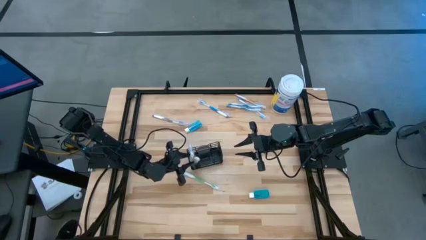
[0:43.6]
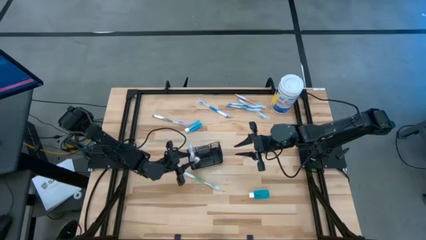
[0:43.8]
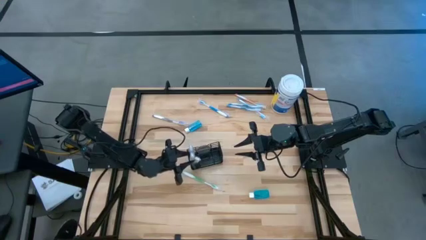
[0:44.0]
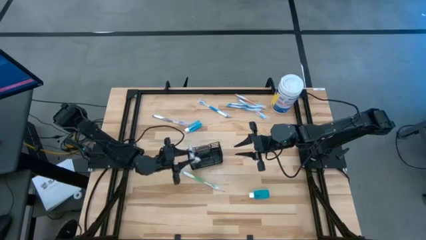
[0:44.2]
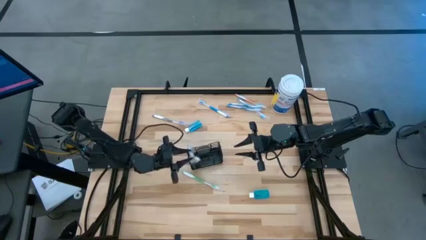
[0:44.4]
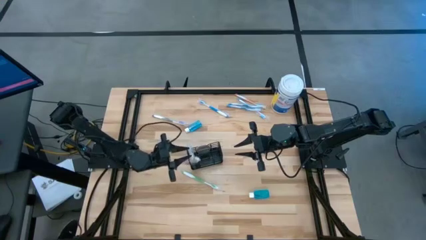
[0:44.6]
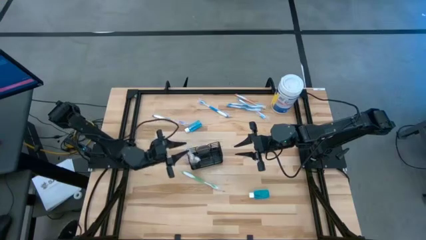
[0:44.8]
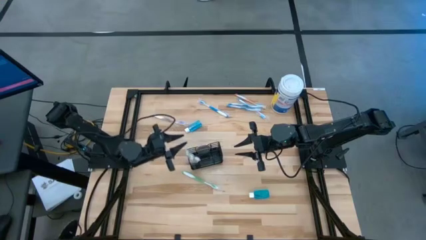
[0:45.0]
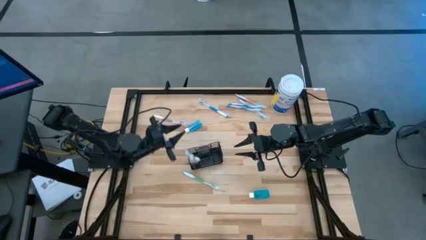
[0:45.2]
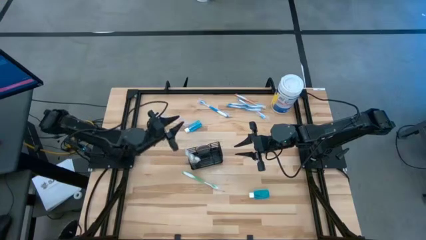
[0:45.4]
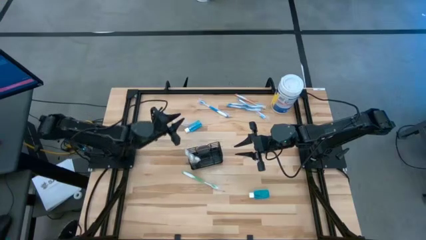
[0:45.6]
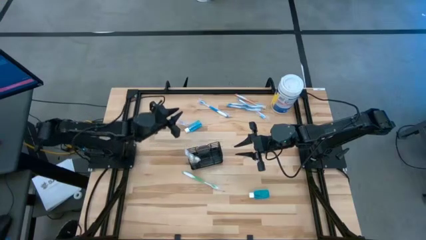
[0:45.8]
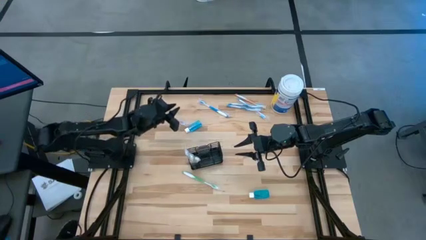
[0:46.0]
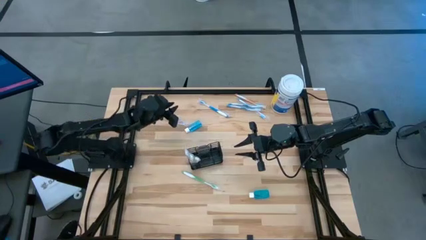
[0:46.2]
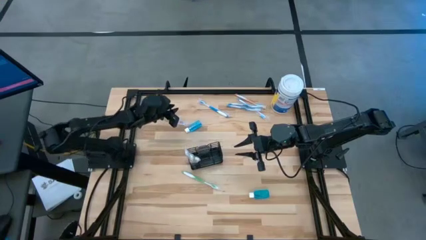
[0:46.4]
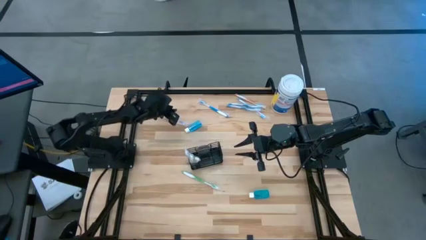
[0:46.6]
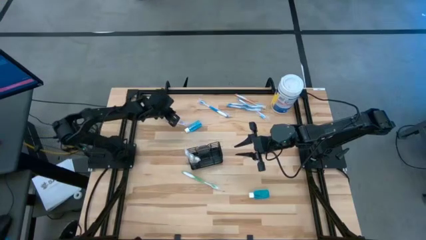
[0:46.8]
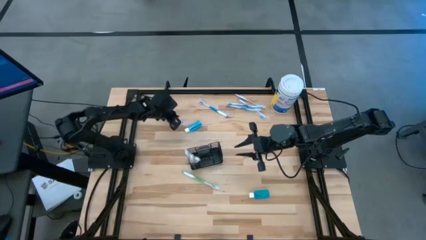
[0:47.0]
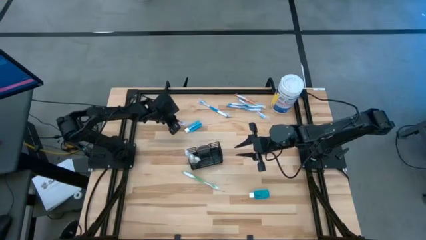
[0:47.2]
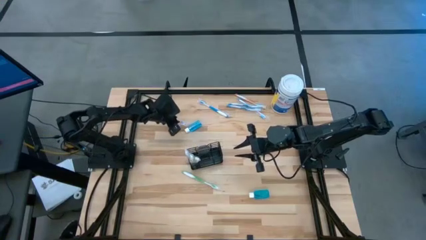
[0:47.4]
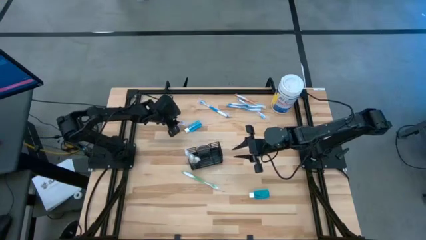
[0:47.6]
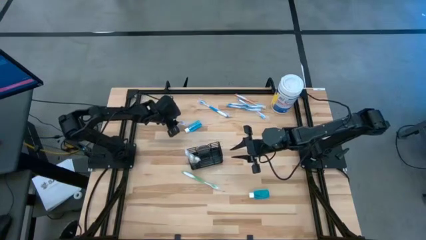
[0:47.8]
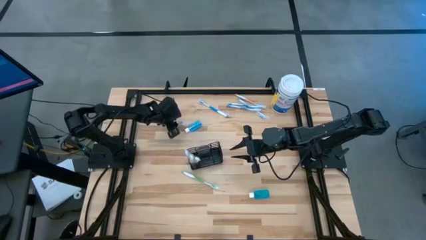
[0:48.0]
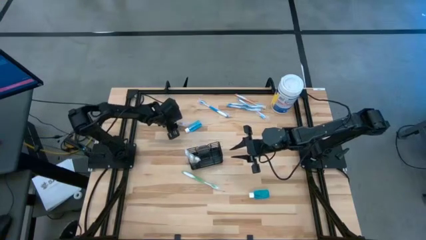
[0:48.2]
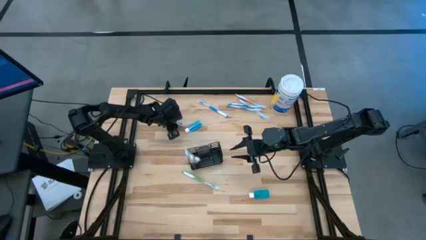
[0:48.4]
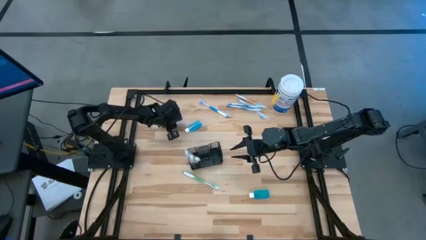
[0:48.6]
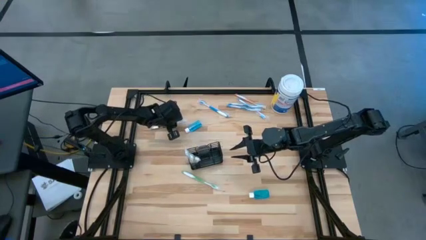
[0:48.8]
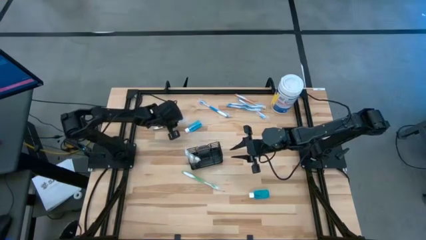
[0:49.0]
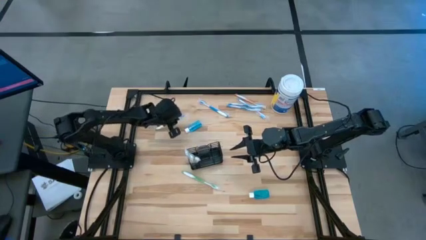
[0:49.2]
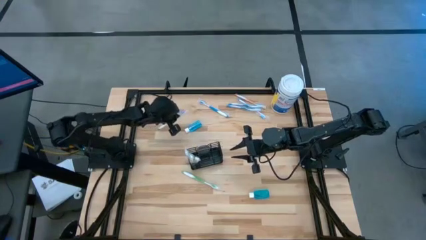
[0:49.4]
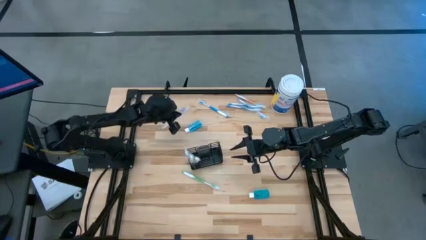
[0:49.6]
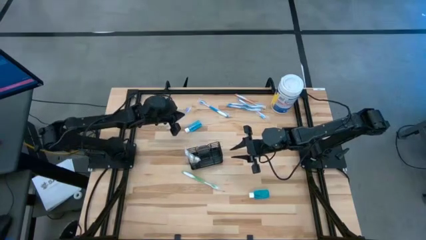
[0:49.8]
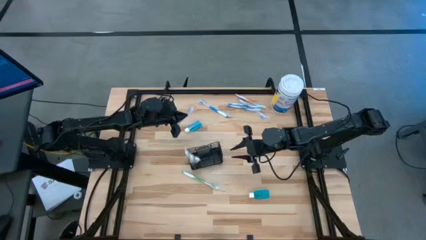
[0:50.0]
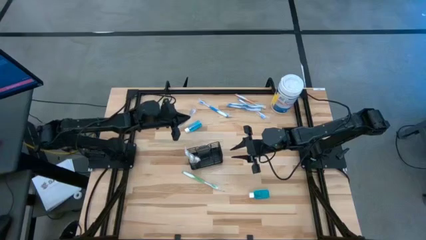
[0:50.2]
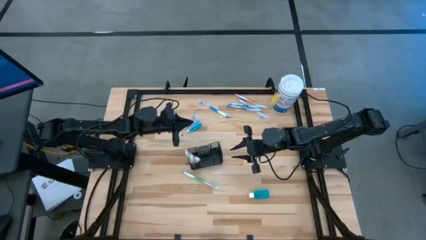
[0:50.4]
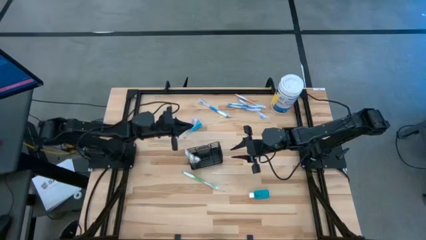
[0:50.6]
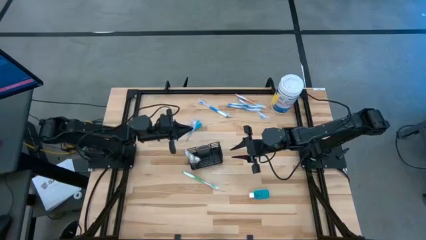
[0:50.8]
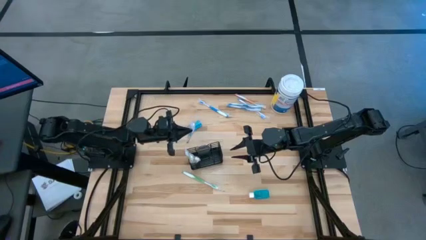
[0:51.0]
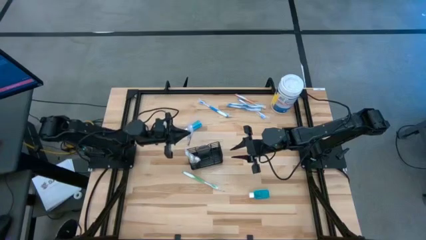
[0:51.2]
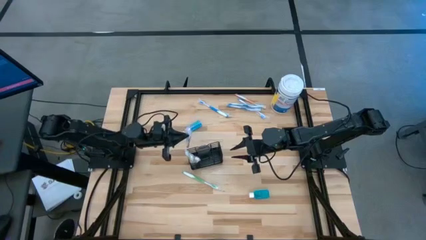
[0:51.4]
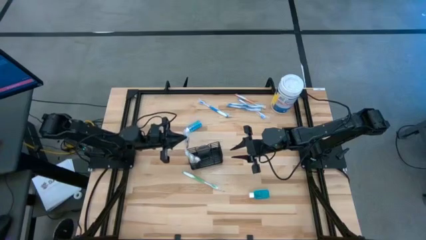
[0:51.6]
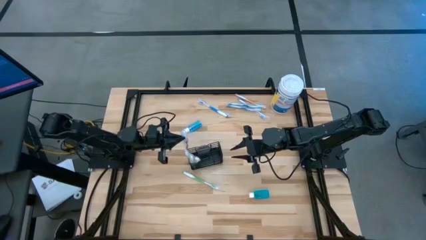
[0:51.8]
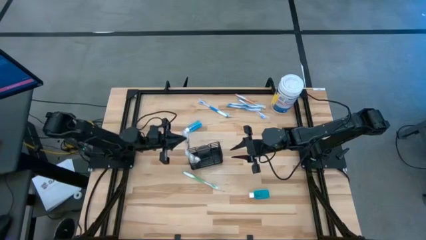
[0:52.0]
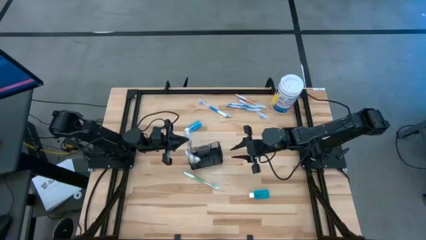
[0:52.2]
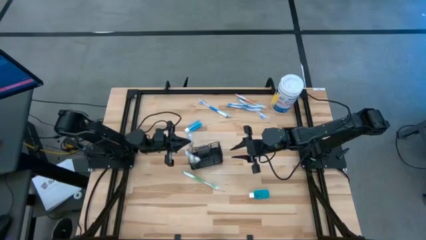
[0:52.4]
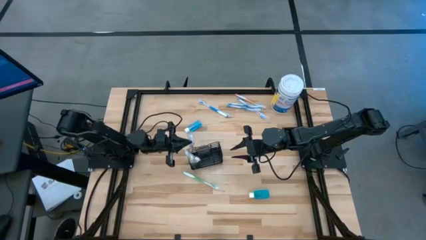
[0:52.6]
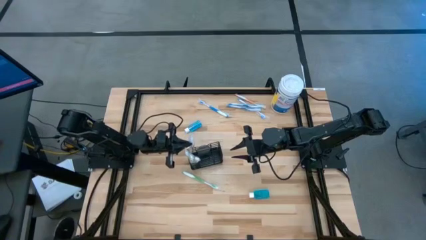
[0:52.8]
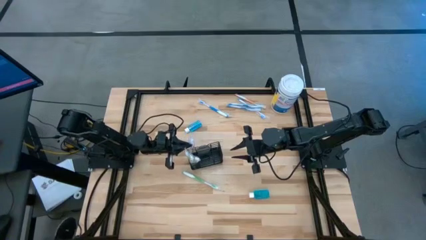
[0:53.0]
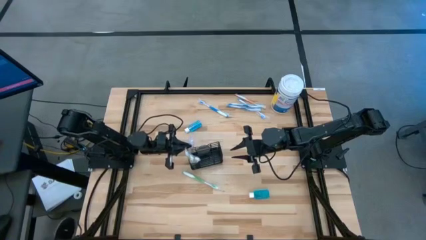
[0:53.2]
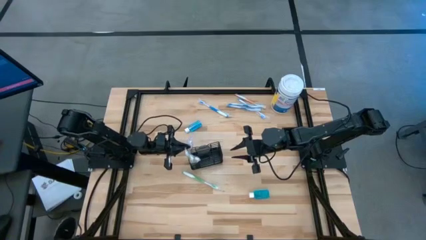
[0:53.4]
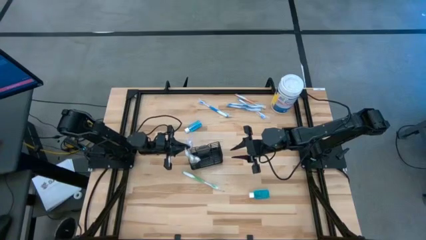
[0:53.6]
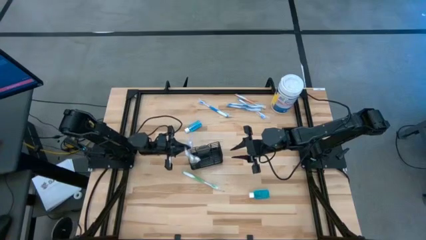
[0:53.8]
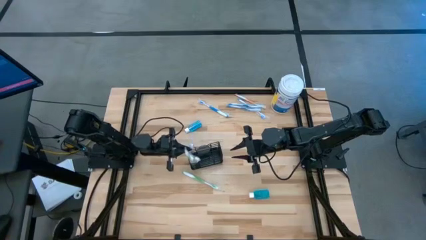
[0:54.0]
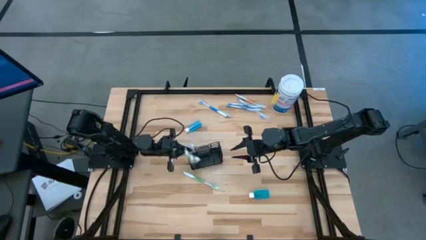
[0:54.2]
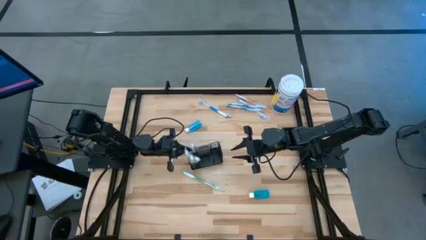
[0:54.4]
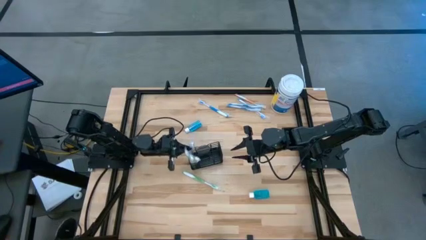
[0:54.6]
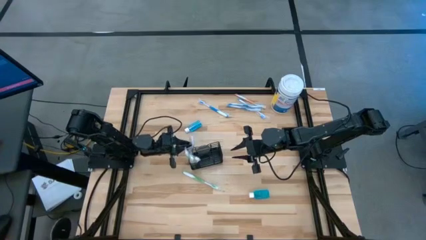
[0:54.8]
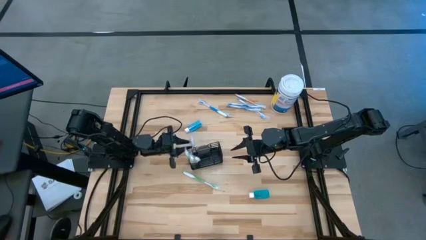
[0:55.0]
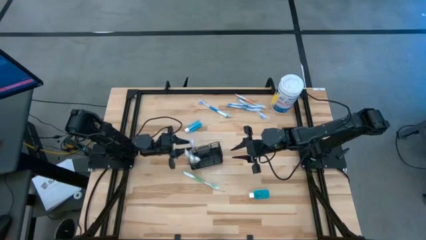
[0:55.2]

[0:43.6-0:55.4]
Task: Pick & Place toothbrushing station
Put the purple toothbrush into the wire organizer
